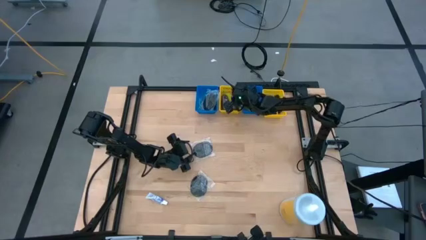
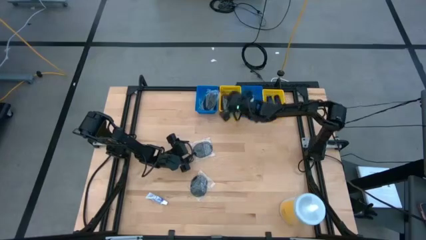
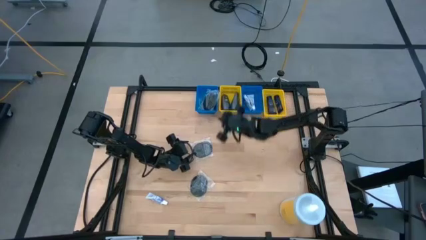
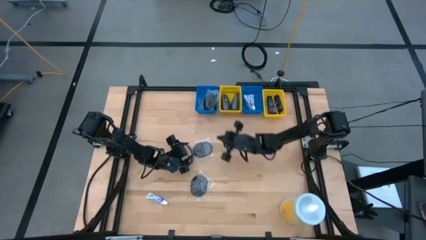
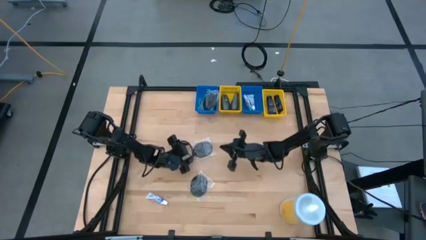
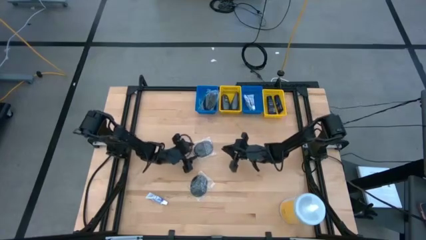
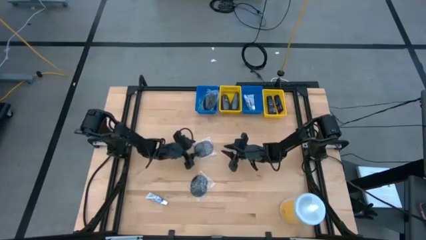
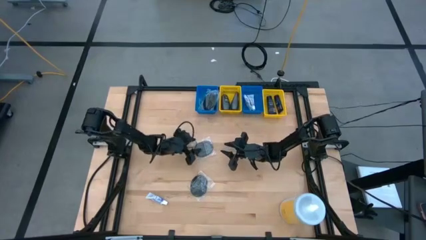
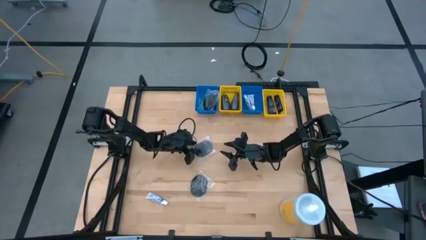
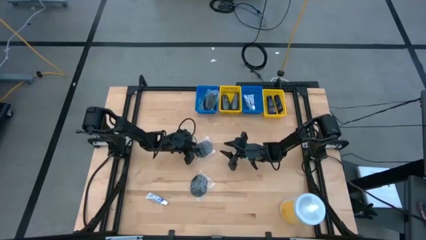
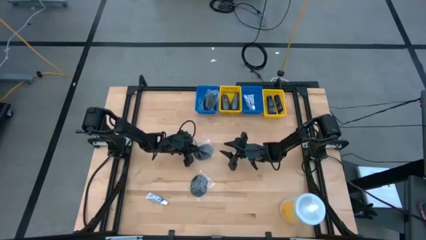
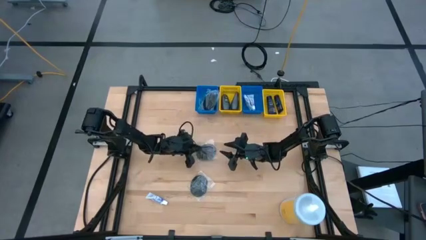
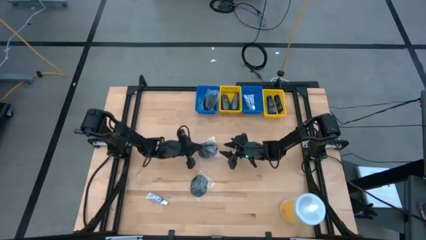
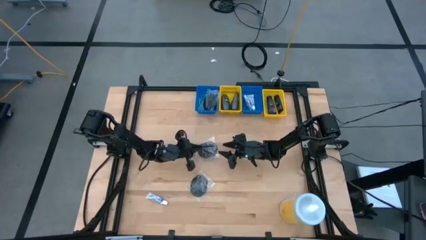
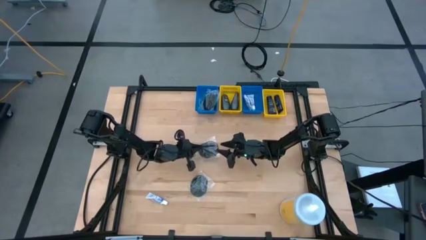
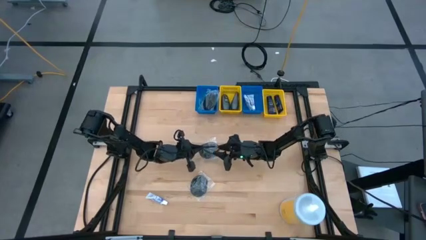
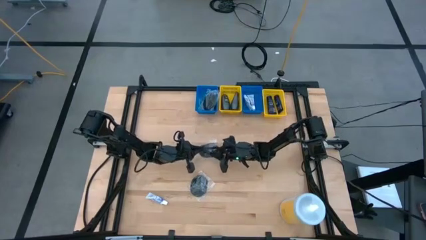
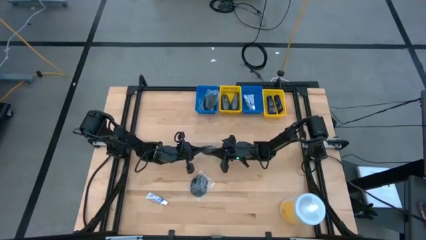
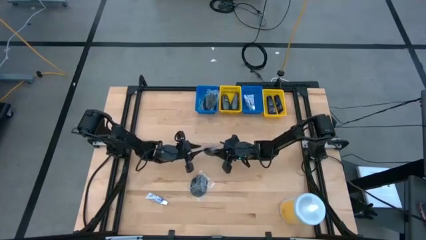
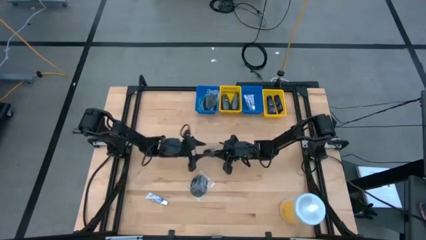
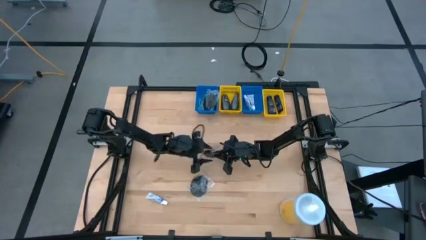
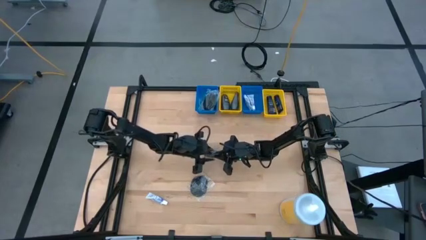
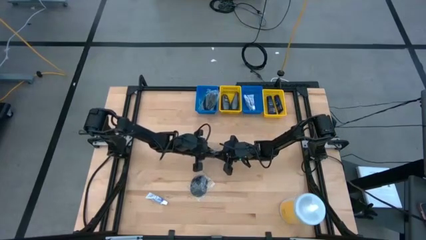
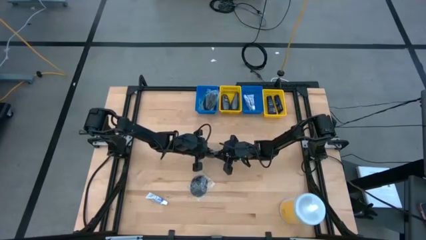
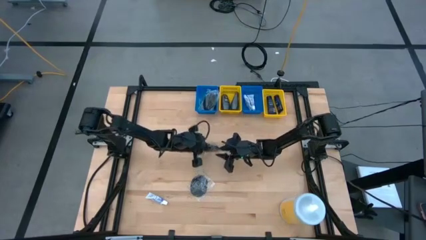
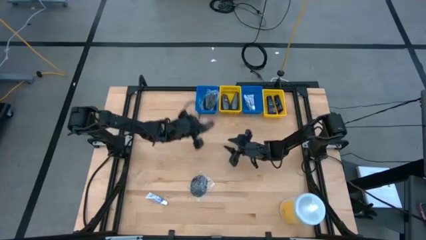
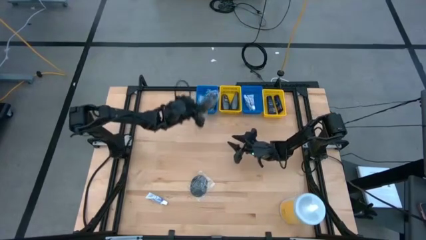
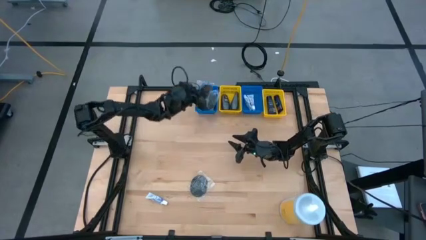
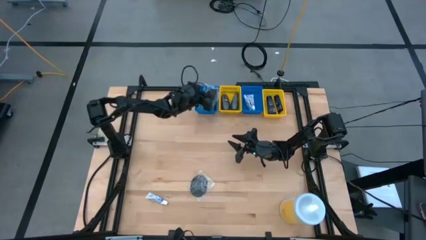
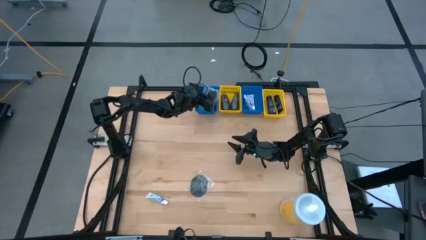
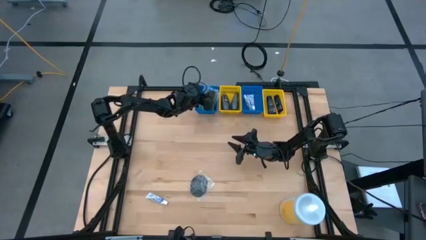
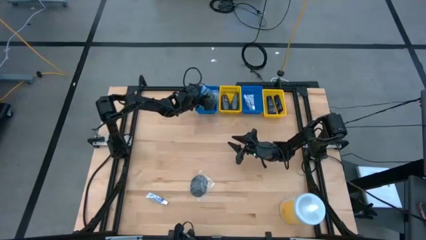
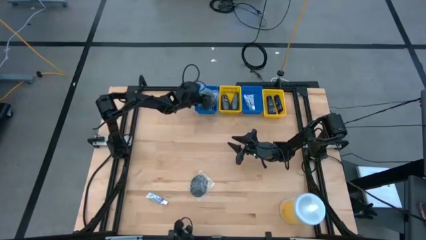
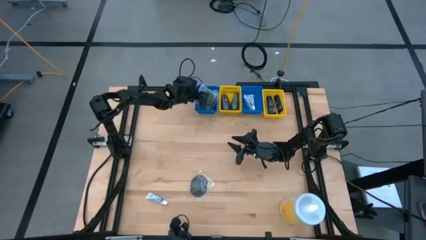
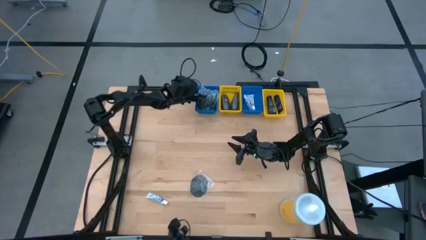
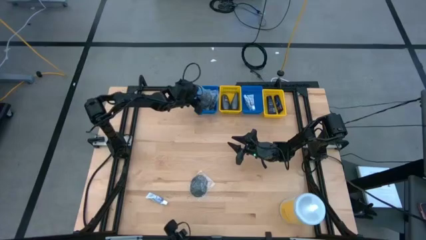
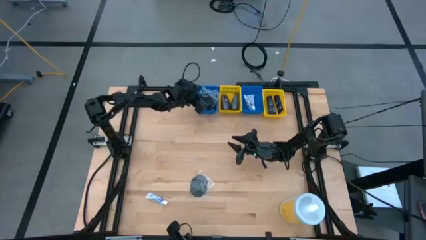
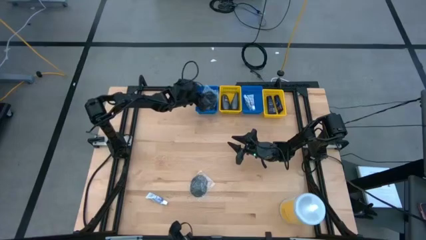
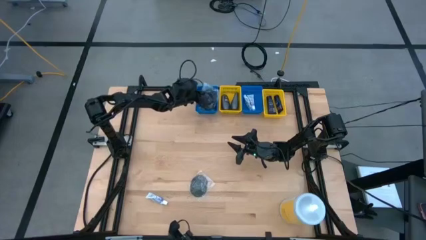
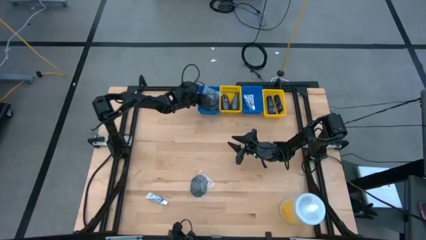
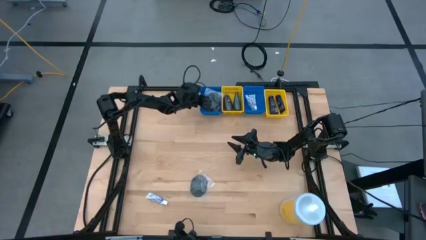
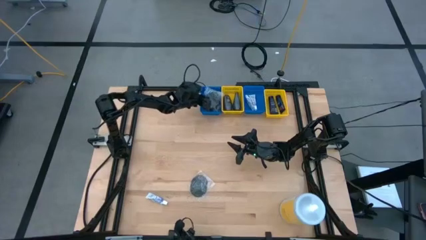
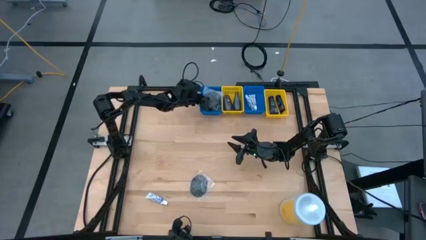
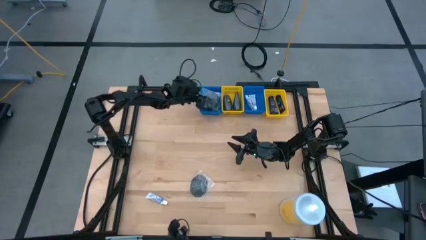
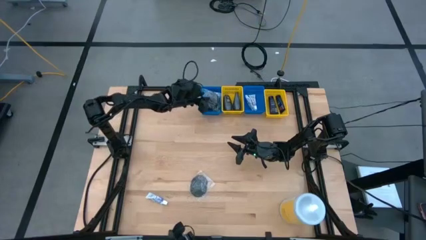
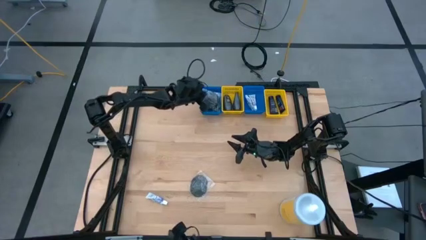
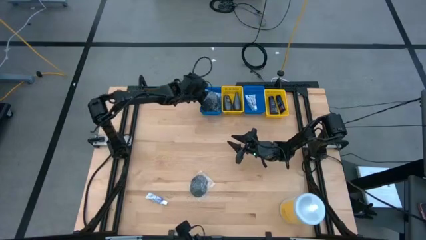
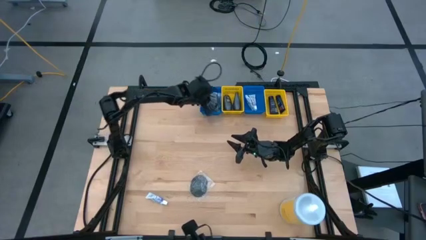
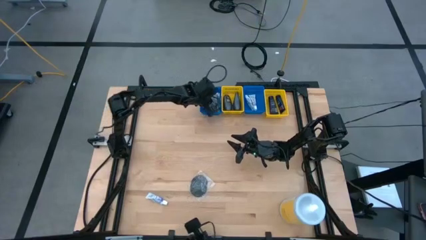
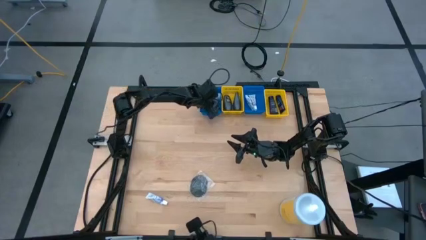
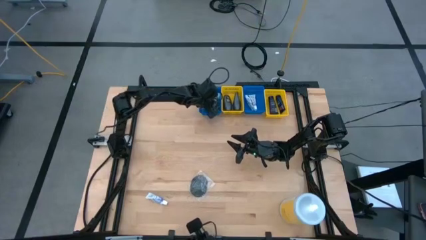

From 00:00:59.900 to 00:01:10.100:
Task: Pick & Place Travel size toiletries
Put the black hairbrush into the left blue bin

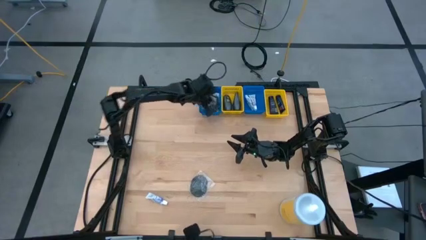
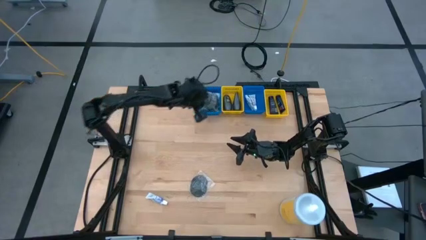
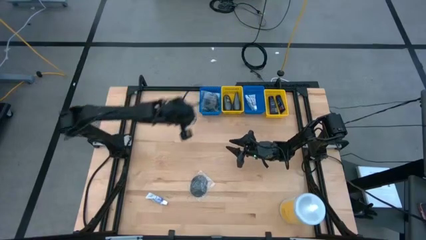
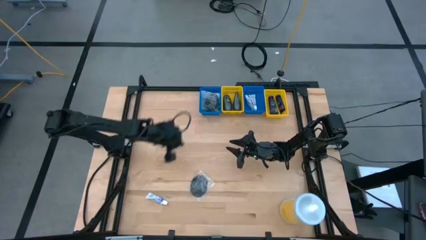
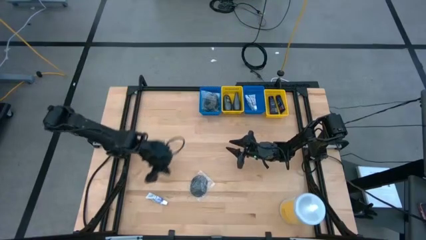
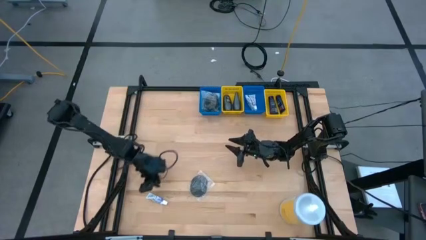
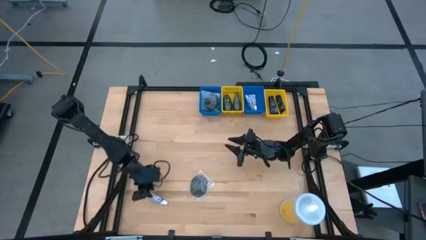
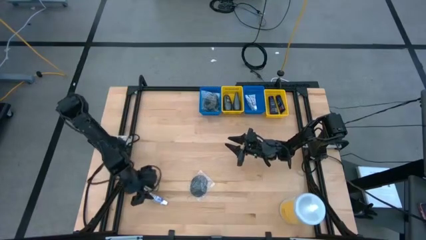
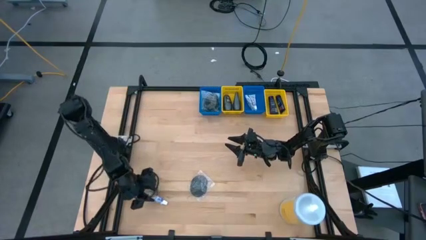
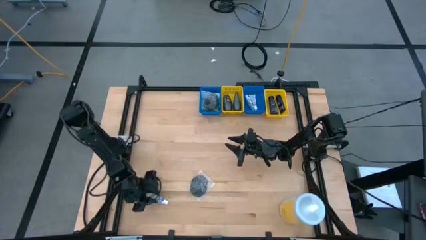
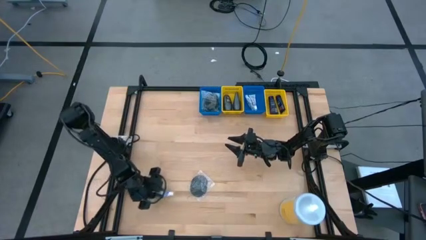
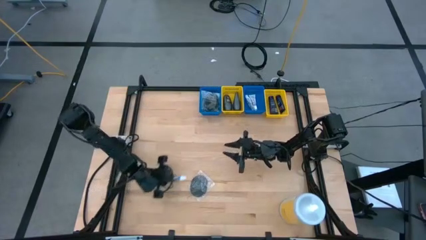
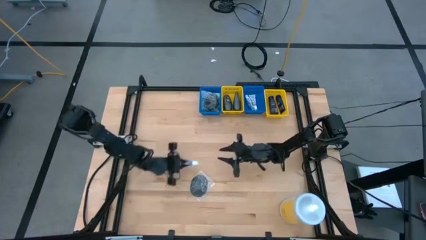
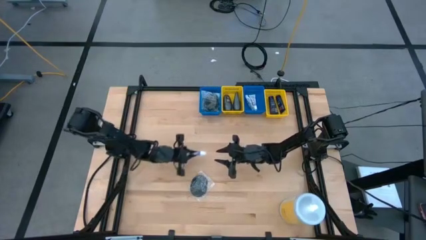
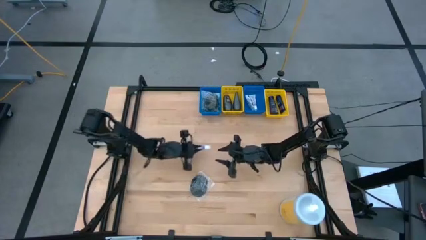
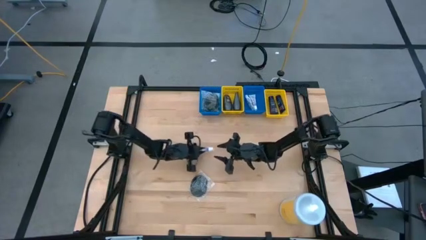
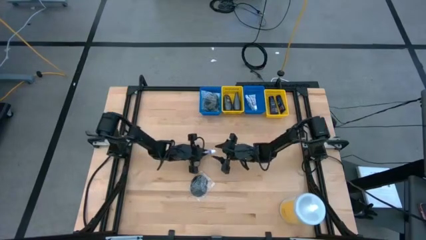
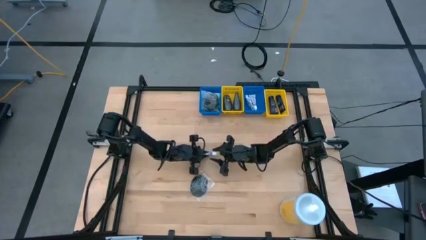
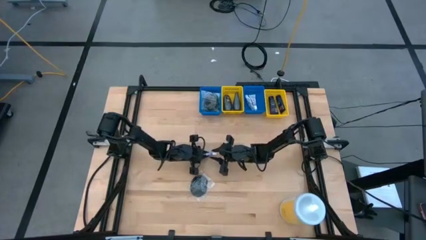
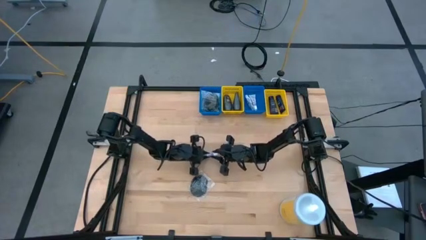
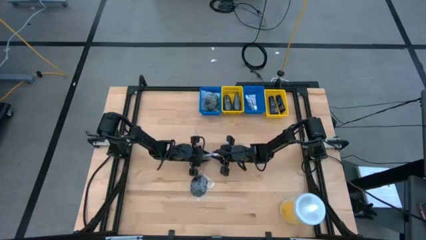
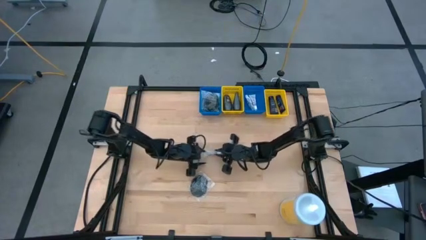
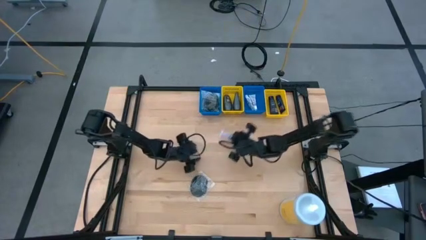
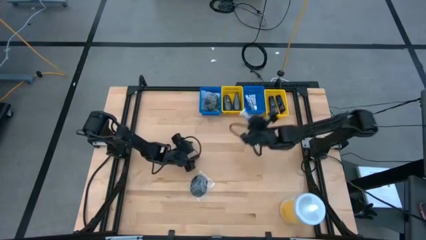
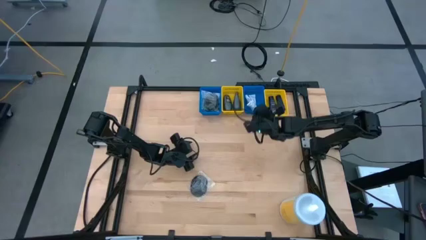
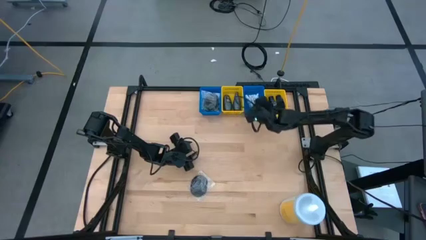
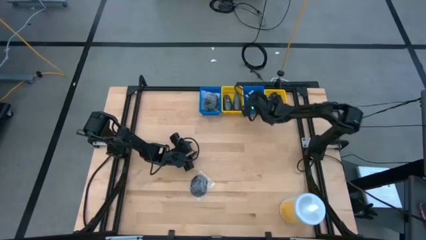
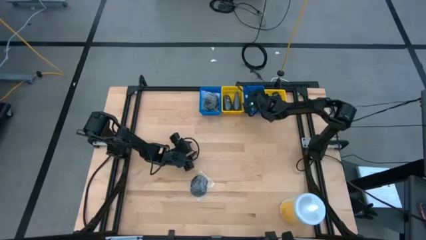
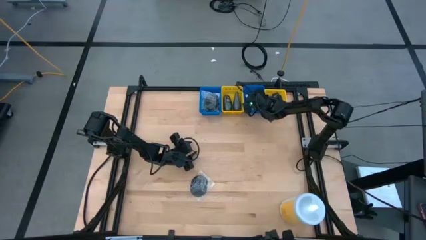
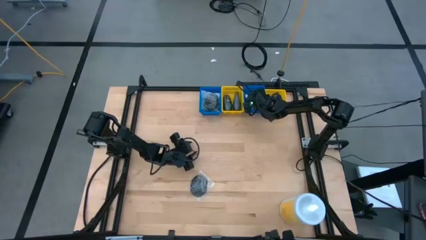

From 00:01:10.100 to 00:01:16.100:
Put the white toothpaste into the right blue bin
